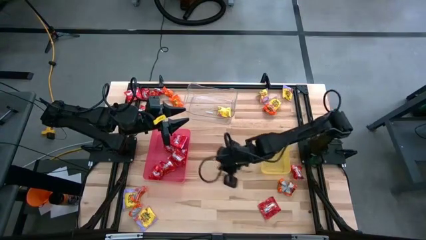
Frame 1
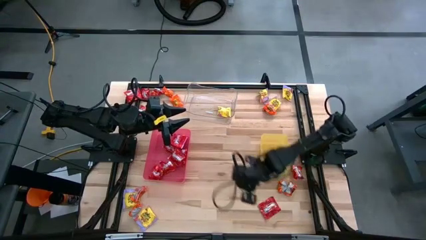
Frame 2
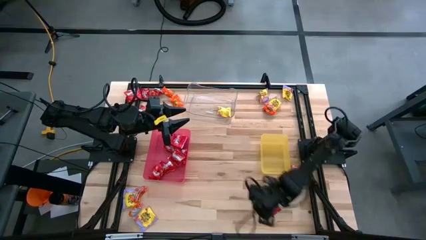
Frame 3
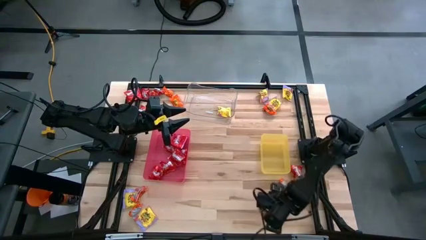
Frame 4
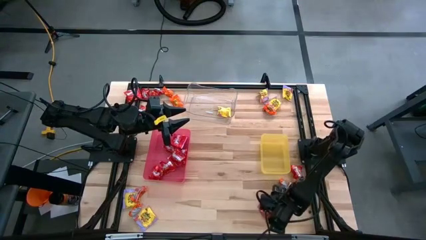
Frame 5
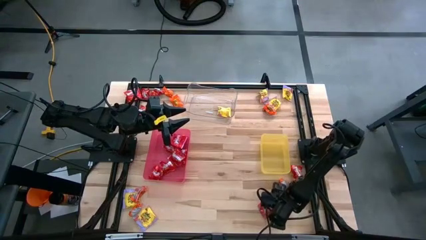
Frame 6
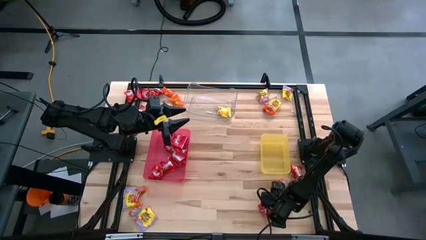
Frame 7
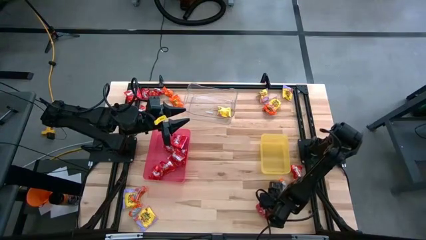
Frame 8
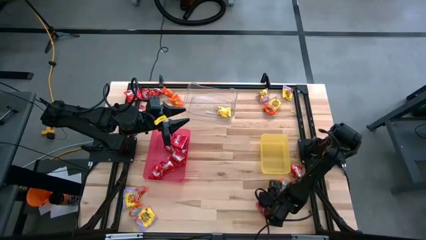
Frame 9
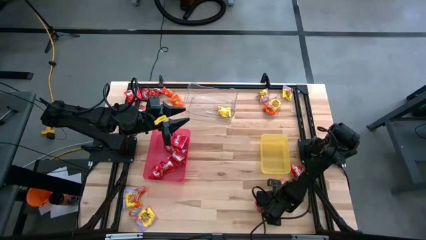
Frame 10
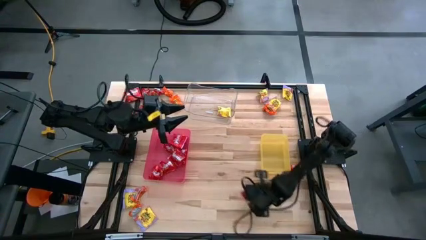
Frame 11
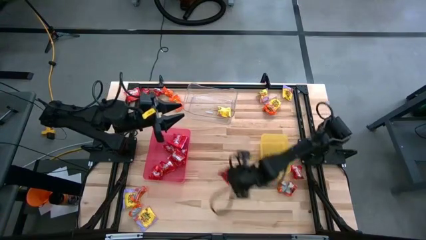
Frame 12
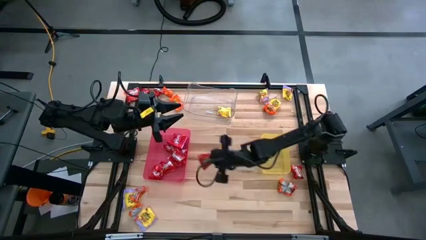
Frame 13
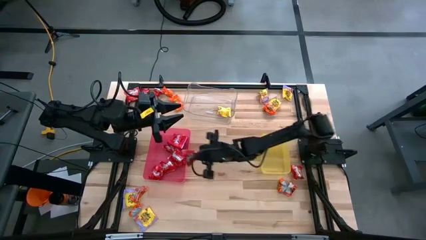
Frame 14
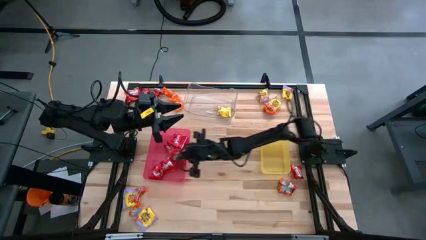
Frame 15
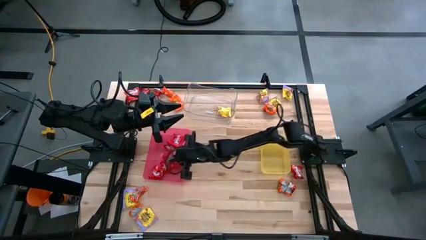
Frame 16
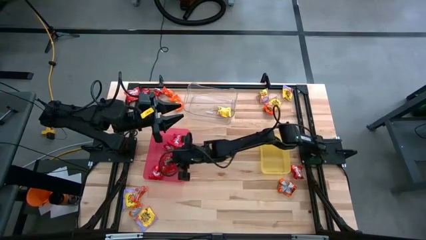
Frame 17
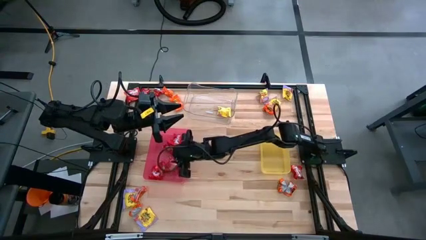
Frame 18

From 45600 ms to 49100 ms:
Task: Sort candy
Put the red candy into the red bin

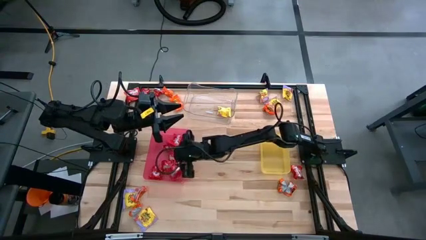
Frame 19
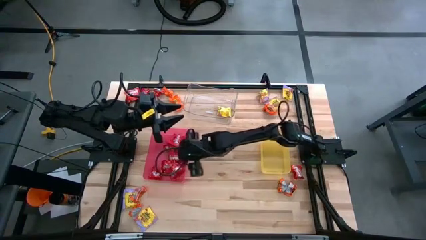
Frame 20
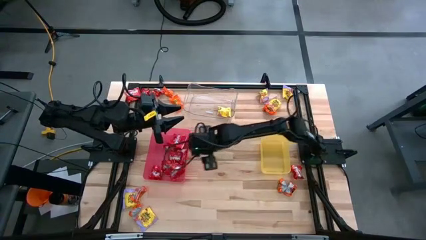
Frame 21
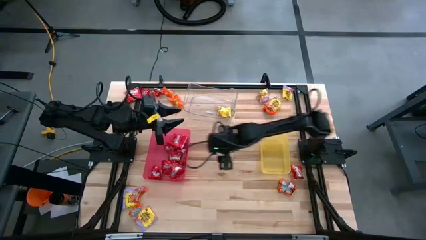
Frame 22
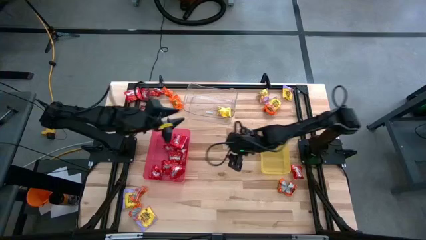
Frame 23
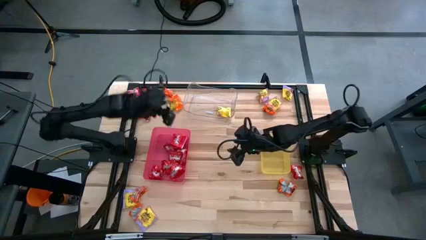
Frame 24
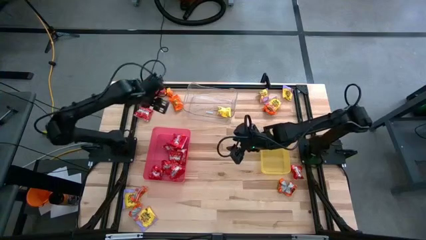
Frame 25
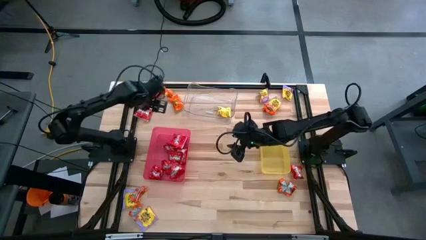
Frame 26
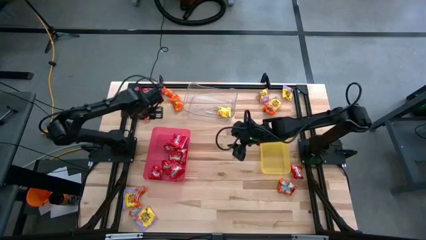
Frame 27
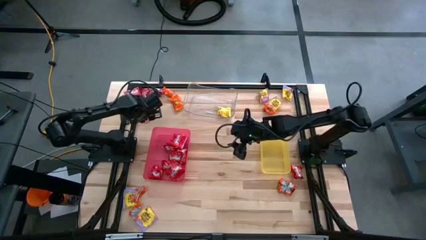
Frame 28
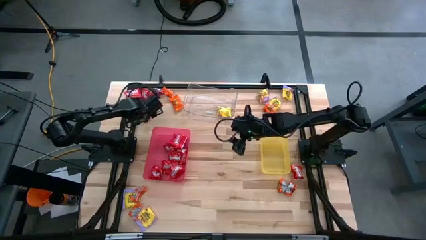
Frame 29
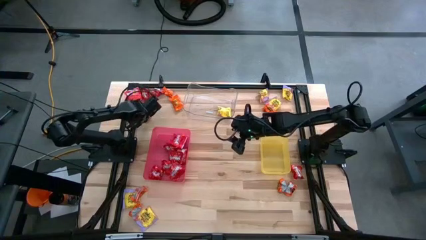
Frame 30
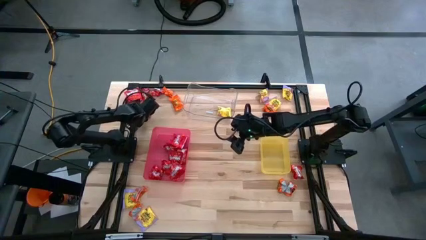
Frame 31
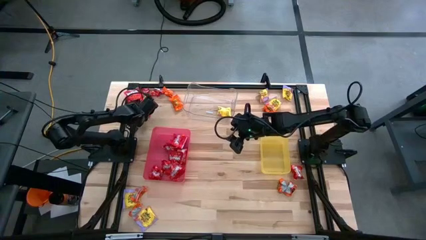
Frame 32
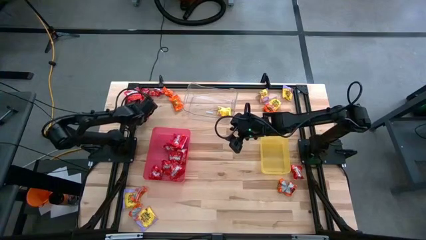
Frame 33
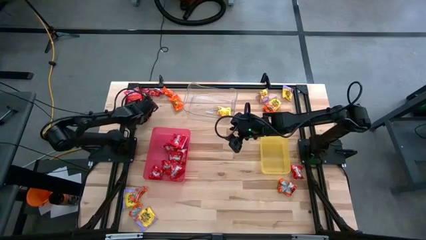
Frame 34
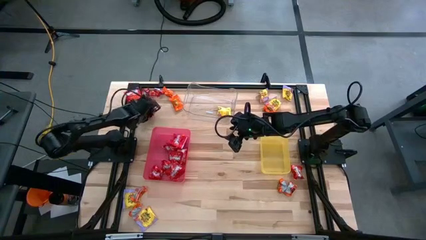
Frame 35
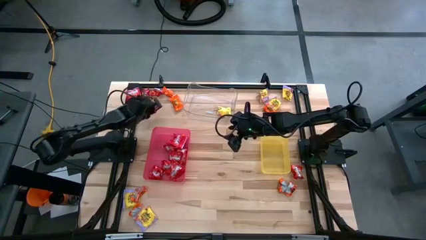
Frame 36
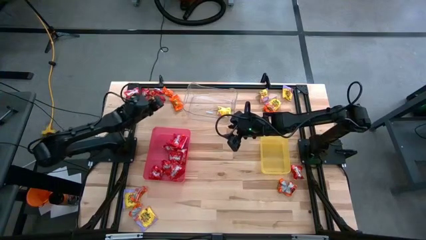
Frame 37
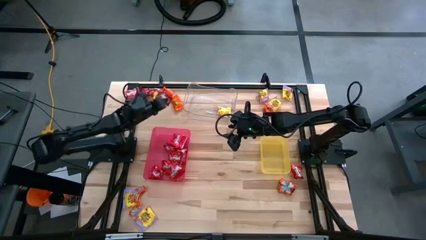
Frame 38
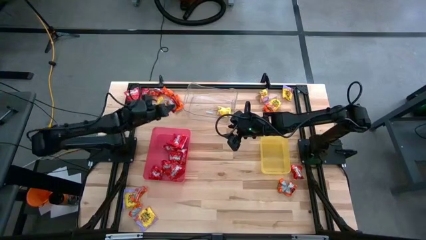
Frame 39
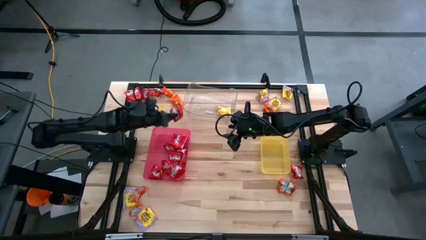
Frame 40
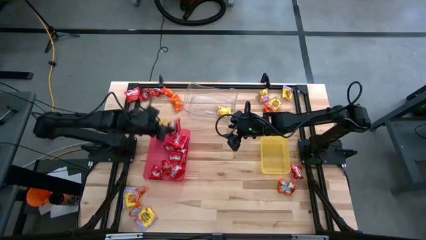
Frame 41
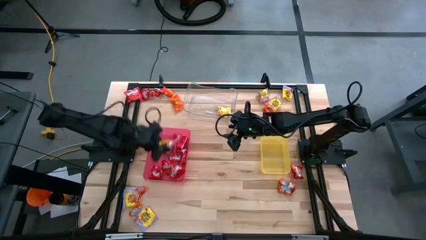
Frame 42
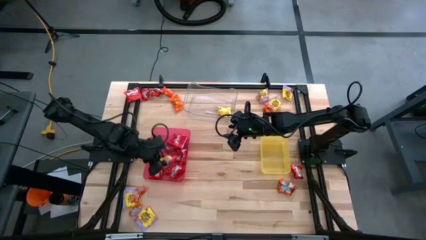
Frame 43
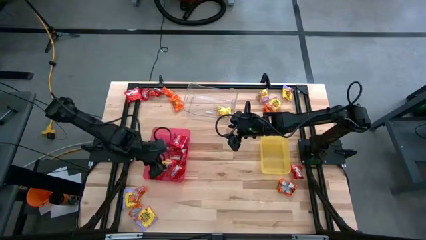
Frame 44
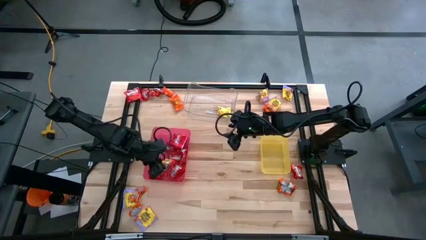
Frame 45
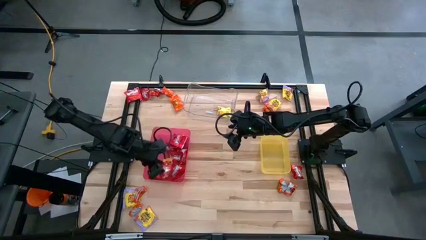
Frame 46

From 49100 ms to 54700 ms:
Put the red candy into the red bin

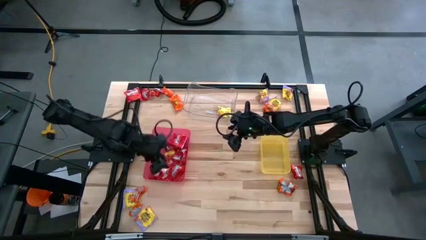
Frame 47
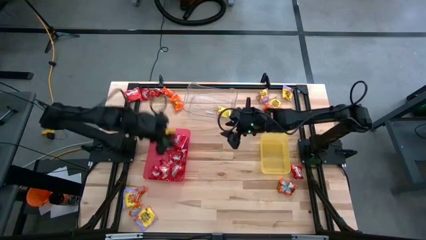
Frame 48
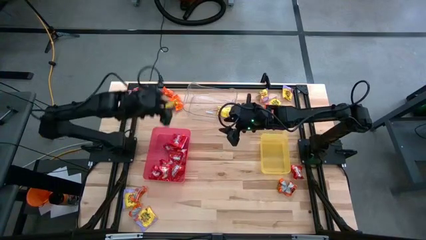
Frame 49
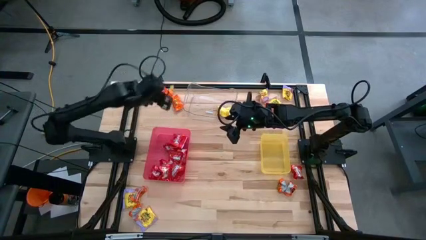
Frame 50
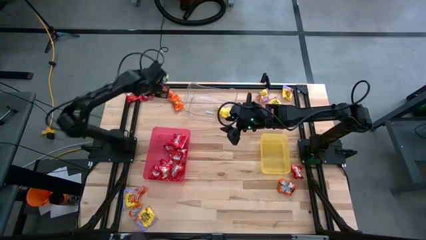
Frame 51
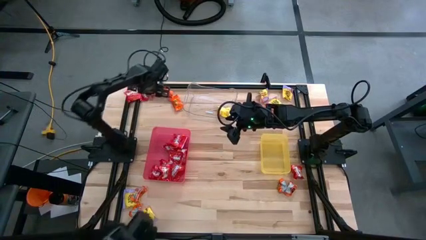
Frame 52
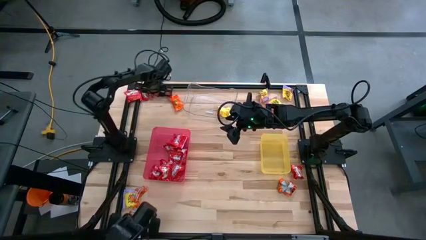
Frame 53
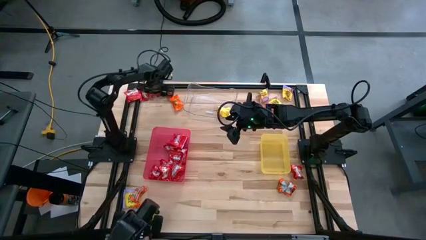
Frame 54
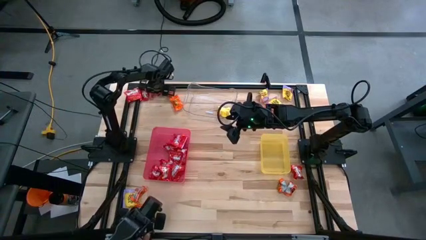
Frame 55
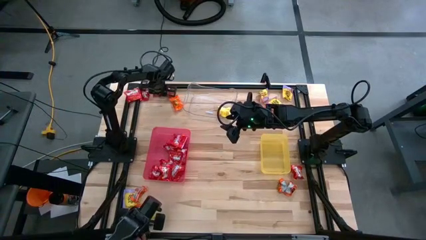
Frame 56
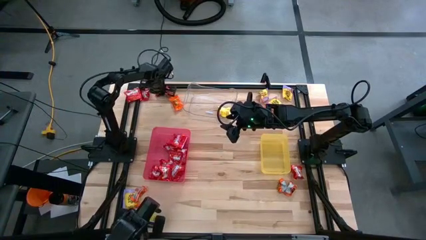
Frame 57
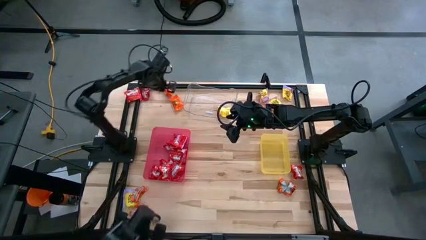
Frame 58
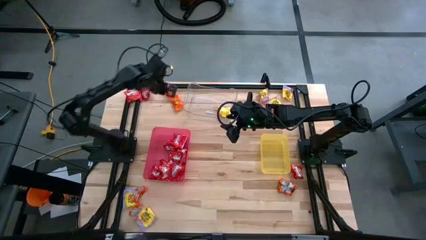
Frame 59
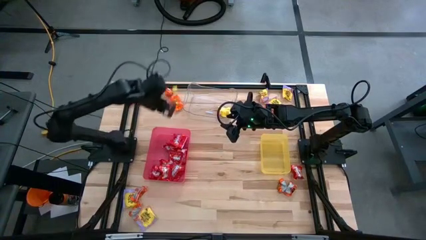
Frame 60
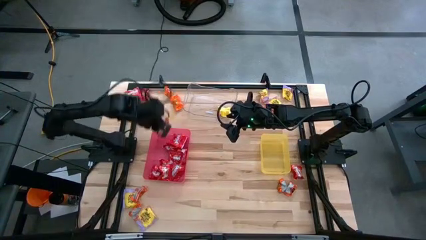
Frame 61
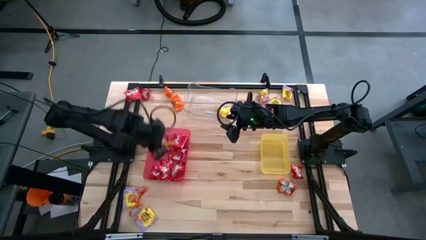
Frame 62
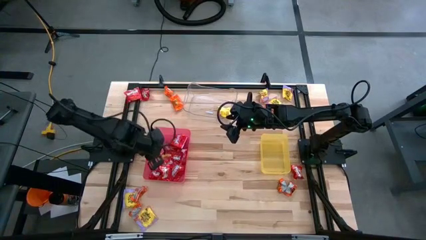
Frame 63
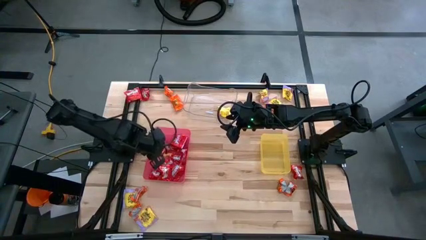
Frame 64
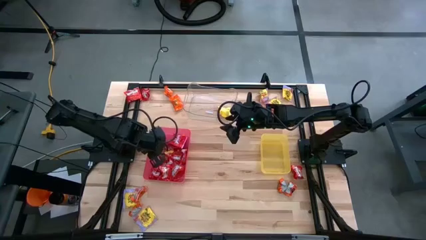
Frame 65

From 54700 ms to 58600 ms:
Put the red candy into the red bin

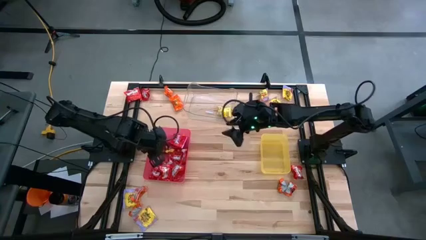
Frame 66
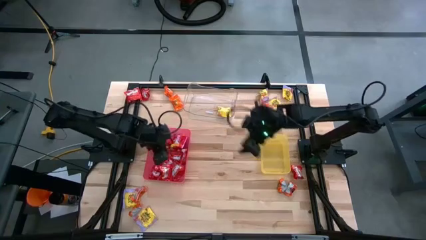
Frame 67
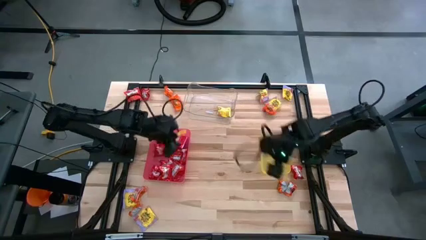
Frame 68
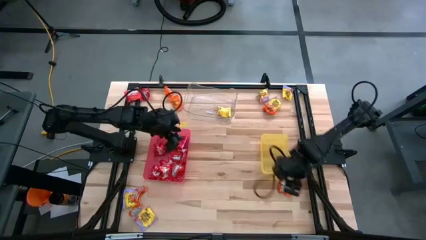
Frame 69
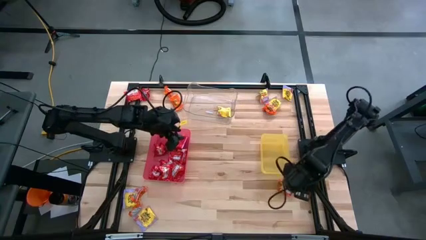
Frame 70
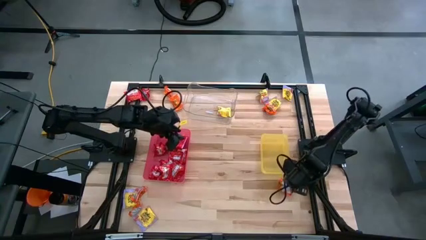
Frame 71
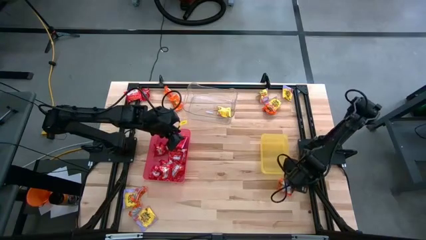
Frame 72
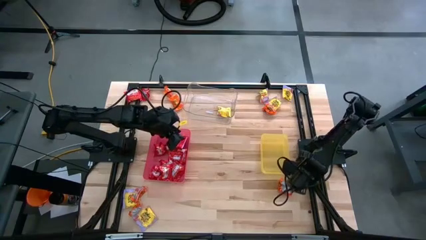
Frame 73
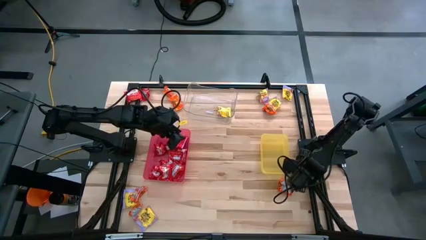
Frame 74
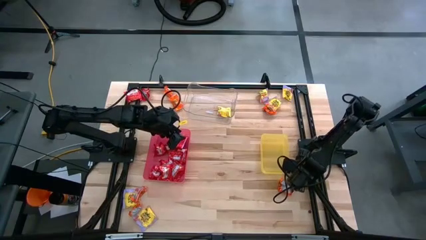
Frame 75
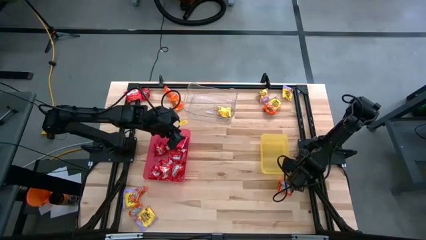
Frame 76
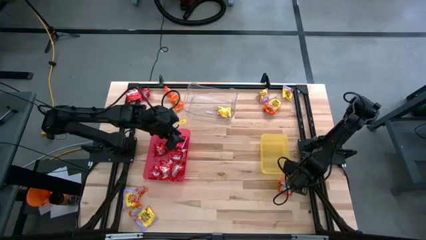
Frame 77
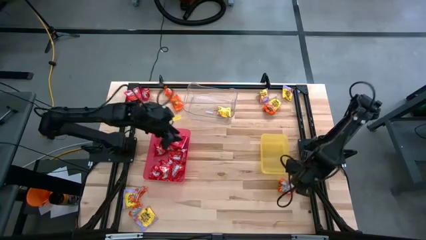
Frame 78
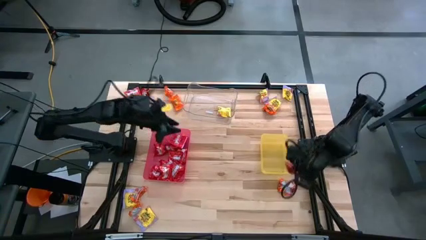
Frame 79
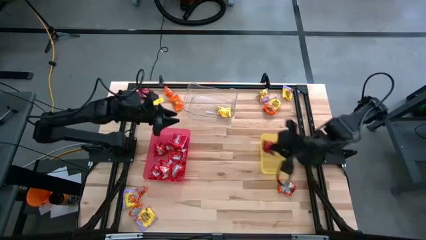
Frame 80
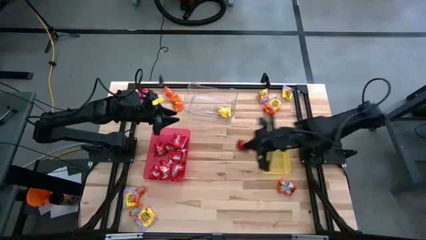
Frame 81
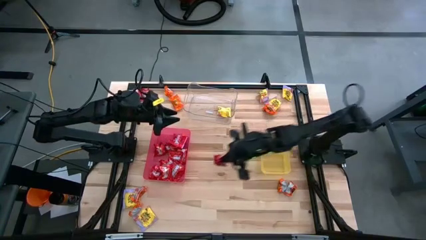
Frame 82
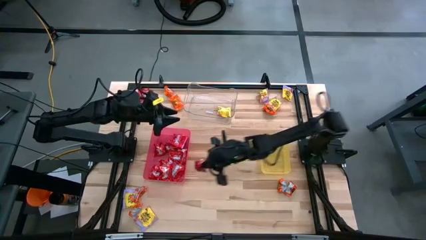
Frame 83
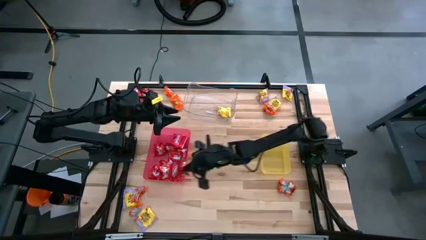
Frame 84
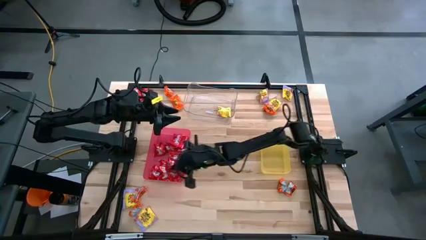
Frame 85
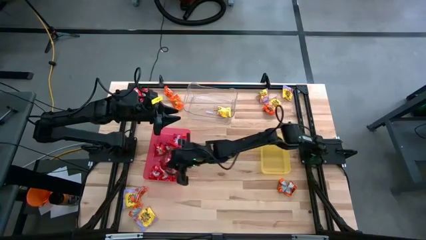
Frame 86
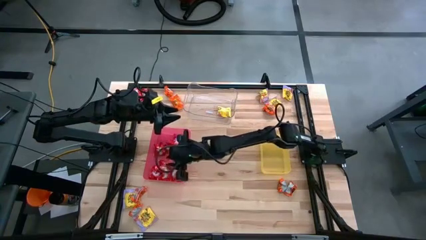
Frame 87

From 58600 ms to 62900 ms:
Put the red candy into the red bin
